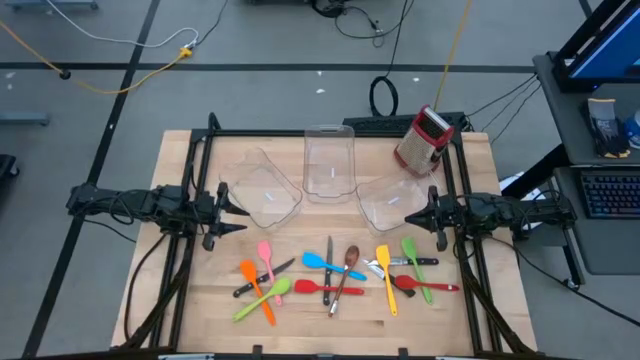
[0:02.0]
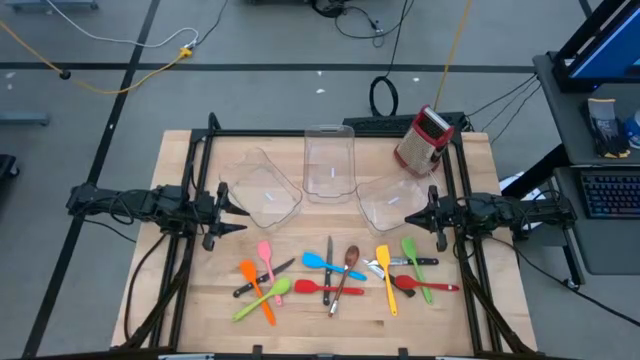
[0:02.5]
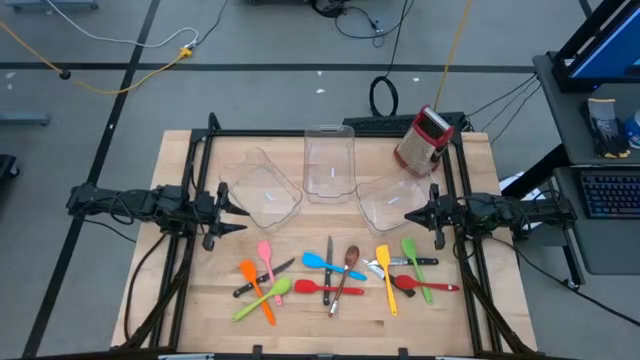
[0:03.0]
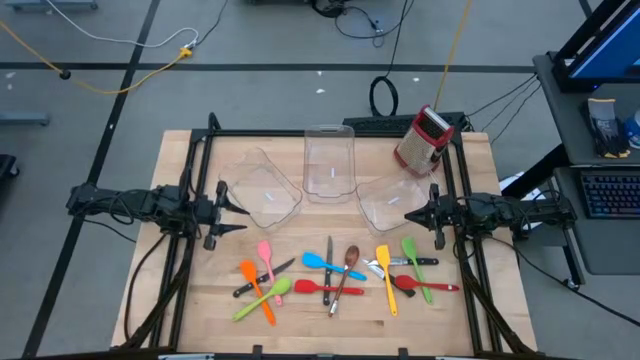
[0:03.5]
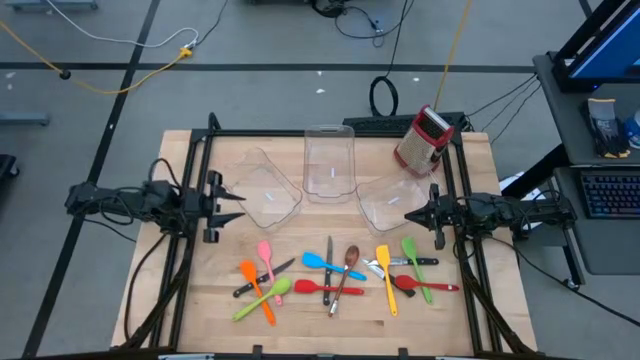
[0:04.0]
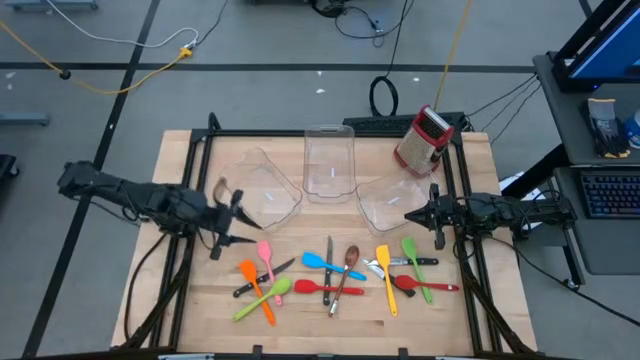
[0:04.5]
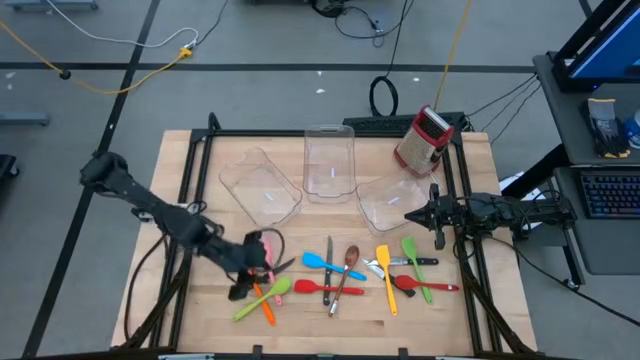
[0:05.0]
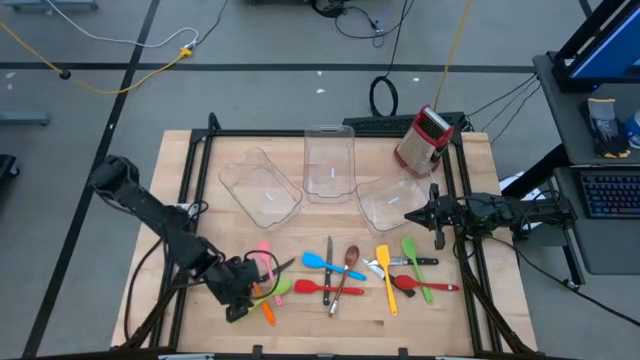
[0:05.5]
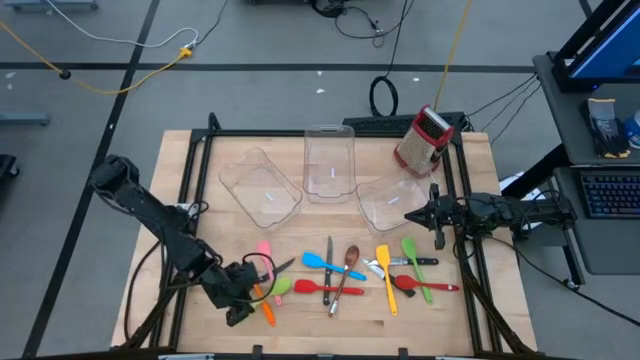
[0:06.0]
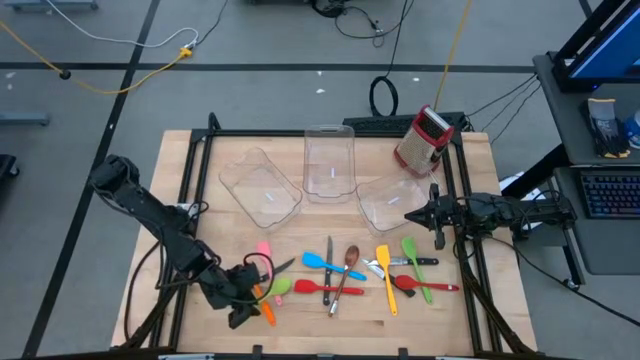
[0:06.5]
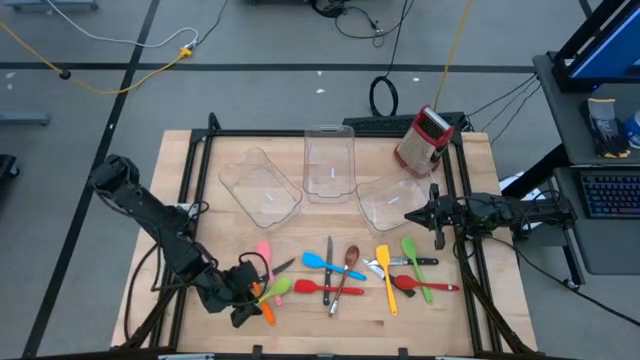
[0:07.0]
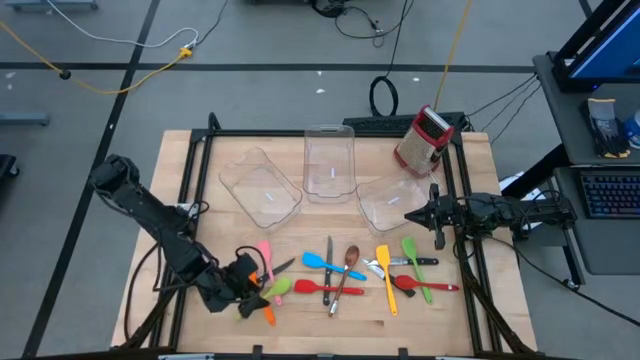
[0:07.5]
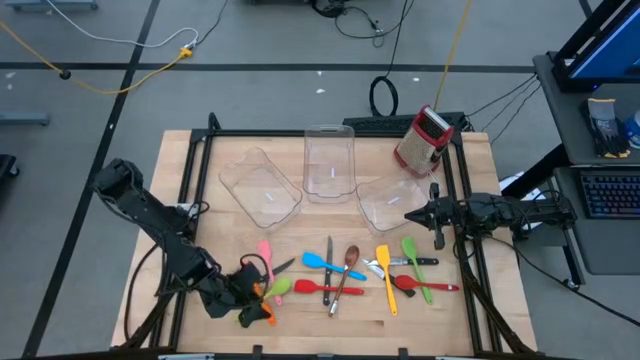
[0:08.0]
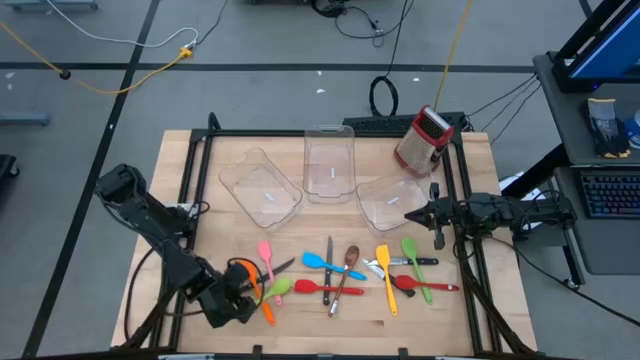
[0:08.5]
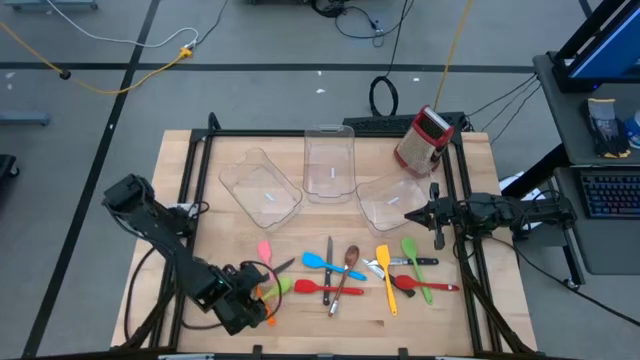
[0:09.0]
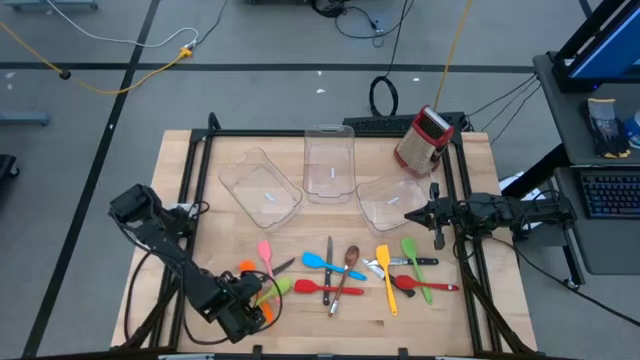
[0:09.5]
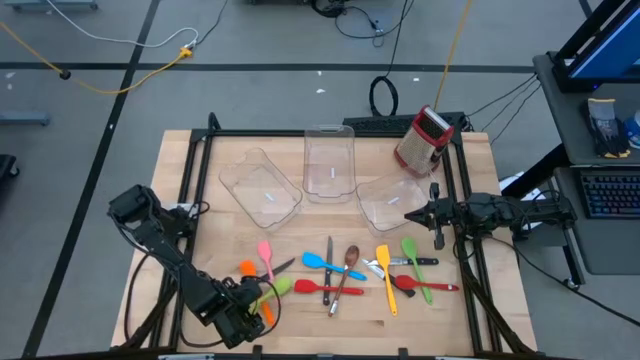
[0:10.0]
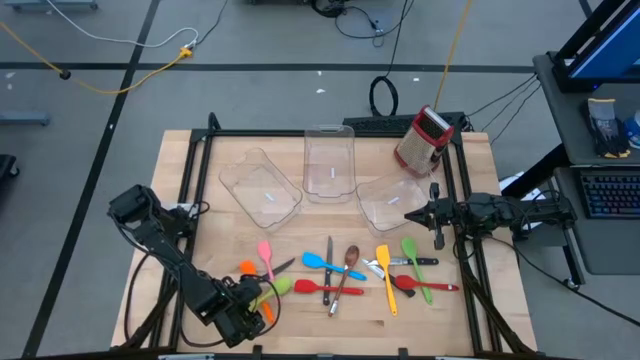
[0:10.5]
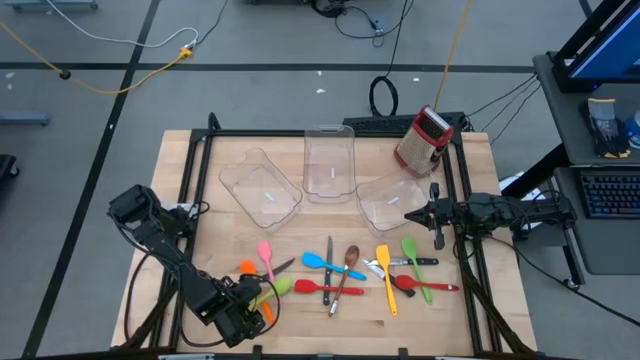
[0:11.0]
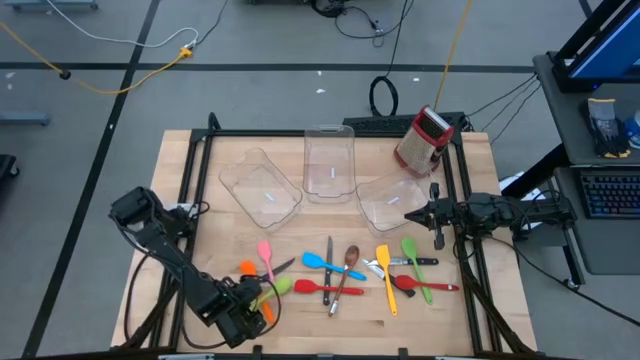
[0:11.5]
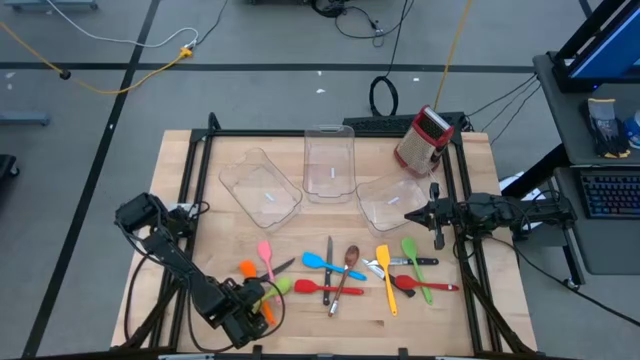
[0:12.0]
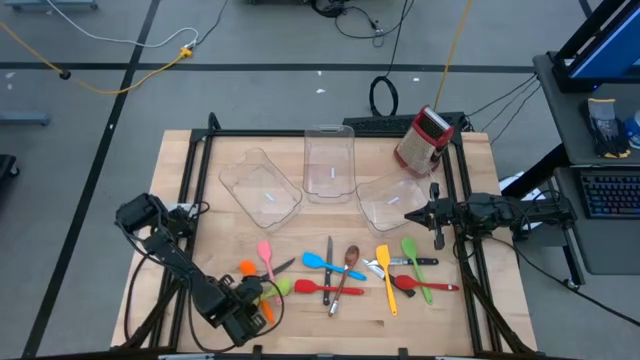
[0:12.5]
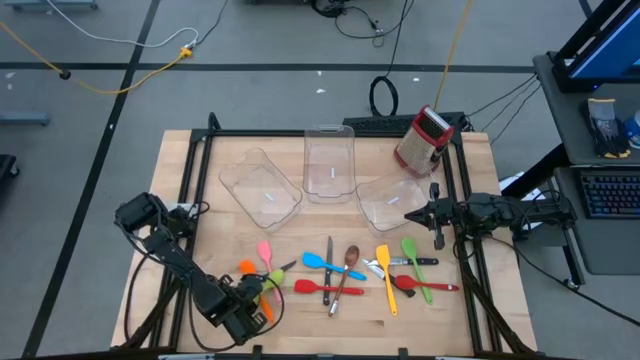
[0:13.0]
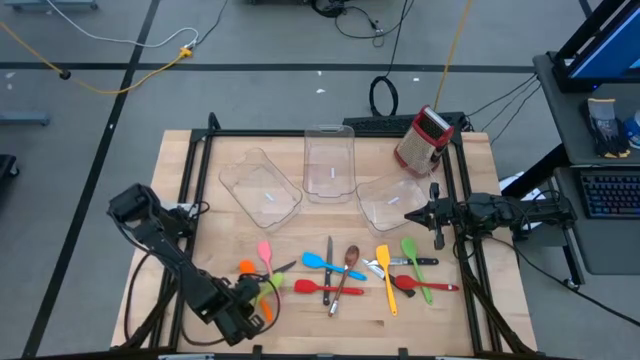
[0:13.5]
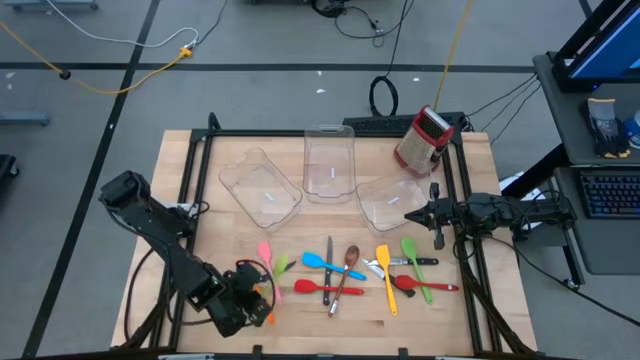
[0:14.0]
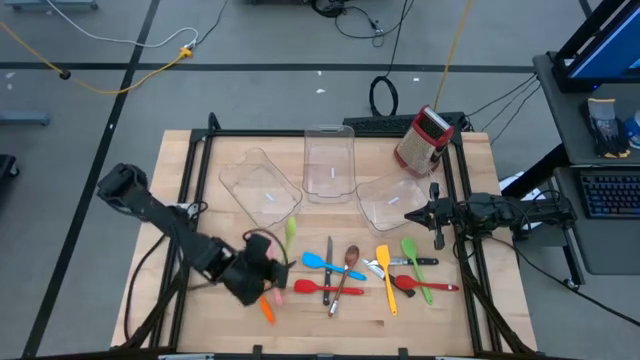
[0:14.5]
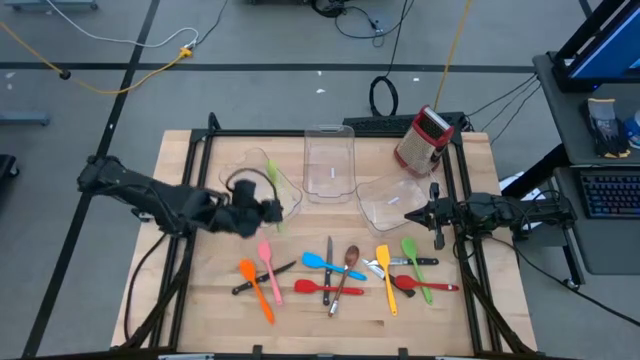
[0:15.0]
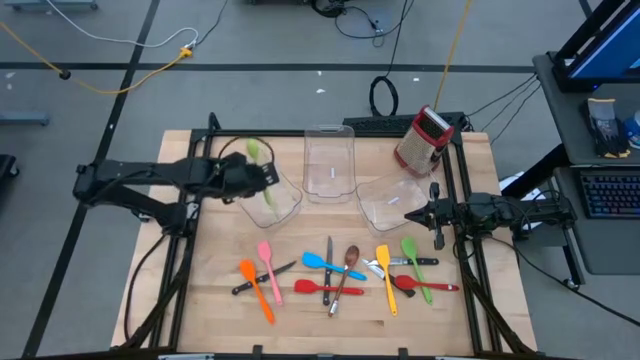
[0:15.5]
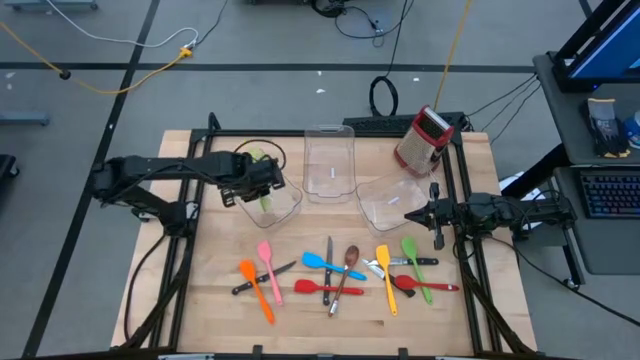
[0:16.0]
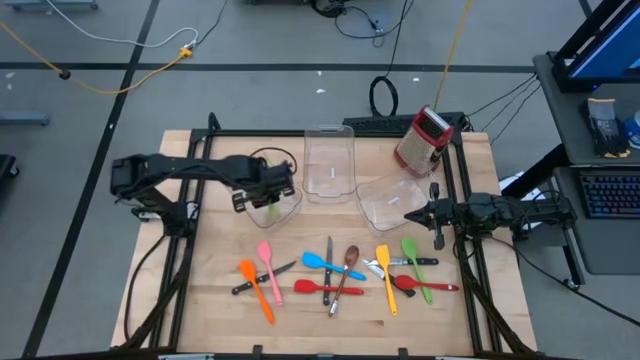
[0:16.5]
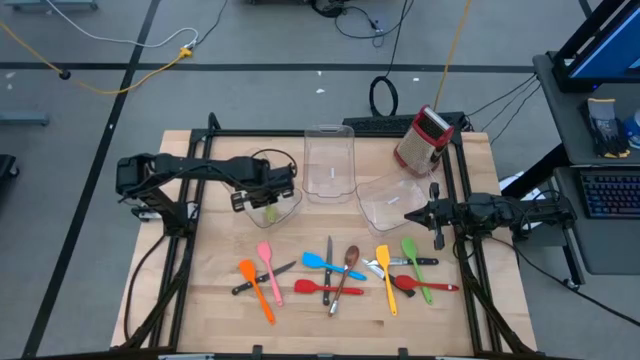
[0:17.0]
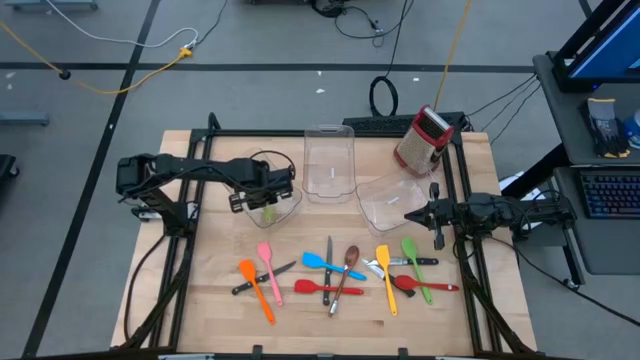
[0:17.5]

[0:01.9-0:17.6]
Task: Pick & Place Kitchen Items
Put the green serving spoon into the left bin

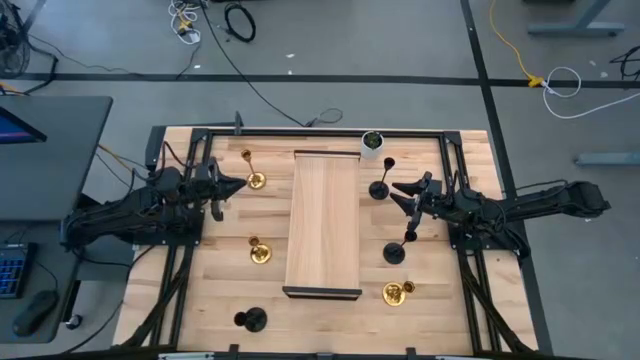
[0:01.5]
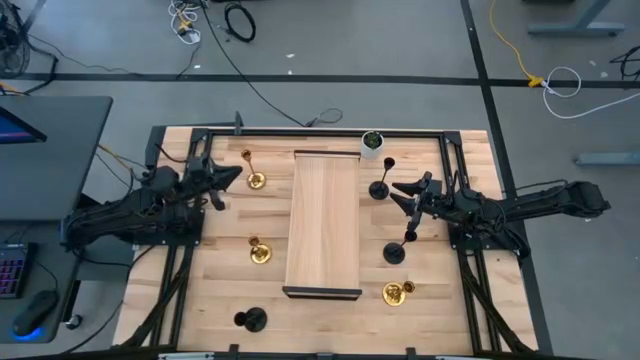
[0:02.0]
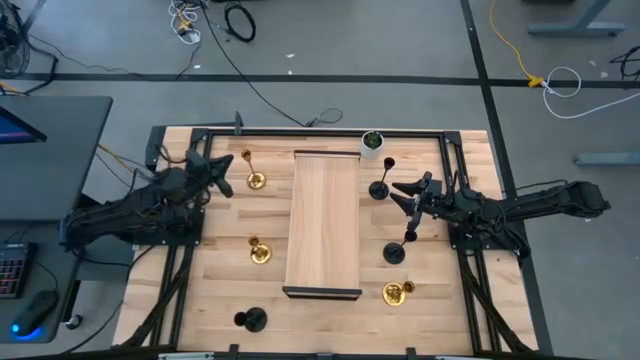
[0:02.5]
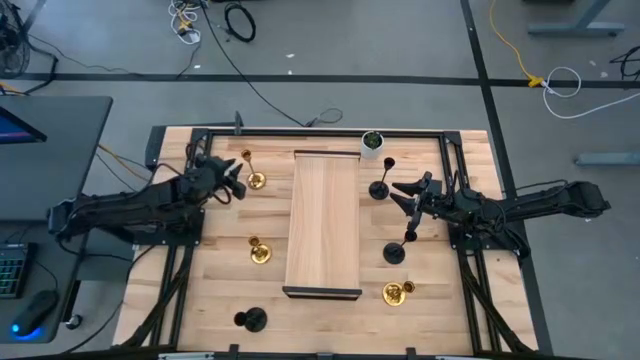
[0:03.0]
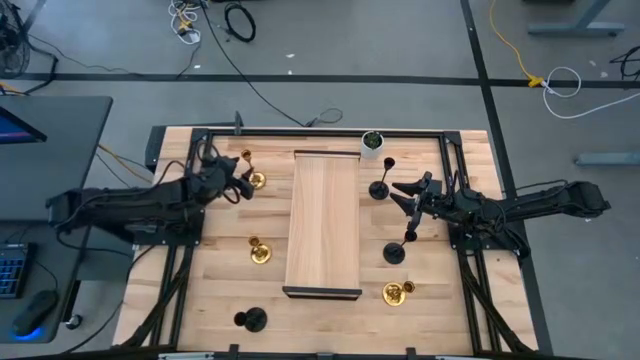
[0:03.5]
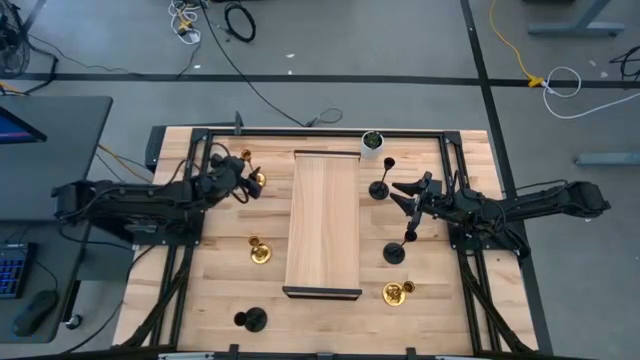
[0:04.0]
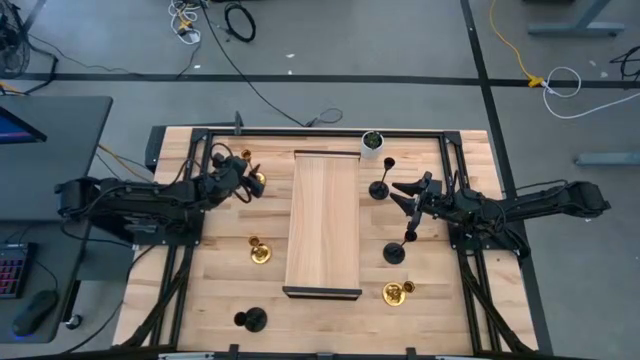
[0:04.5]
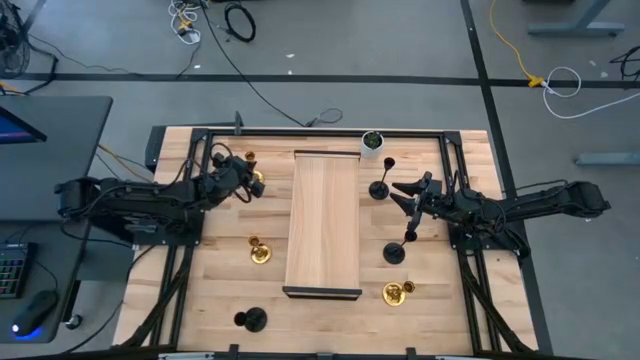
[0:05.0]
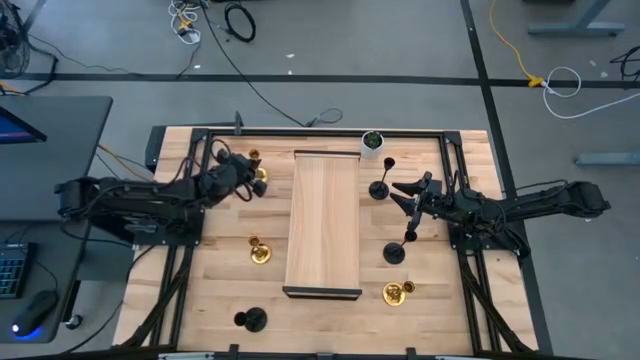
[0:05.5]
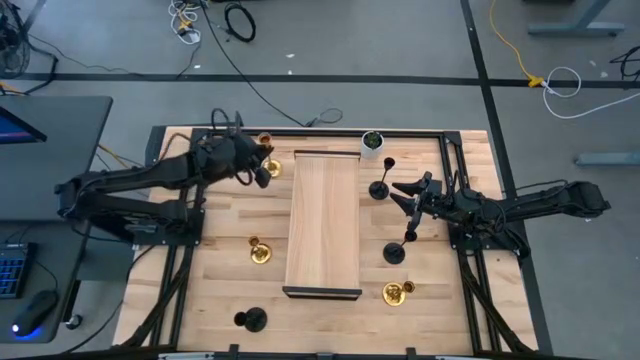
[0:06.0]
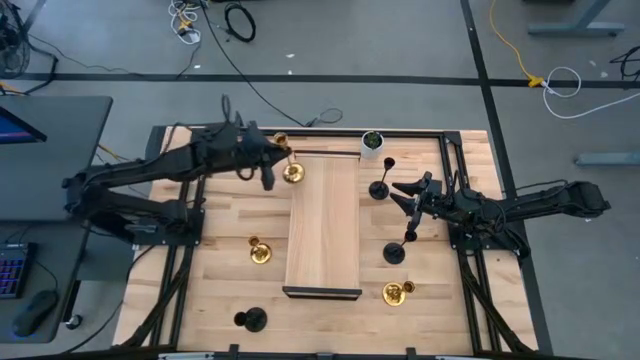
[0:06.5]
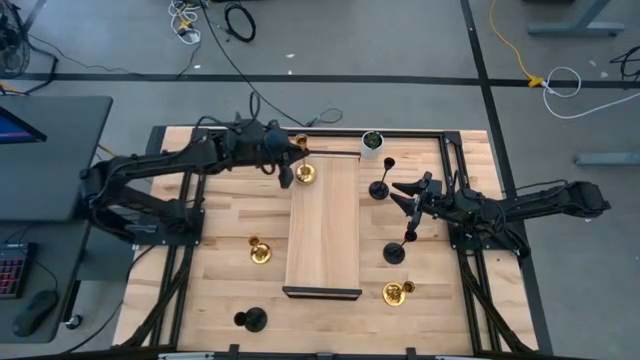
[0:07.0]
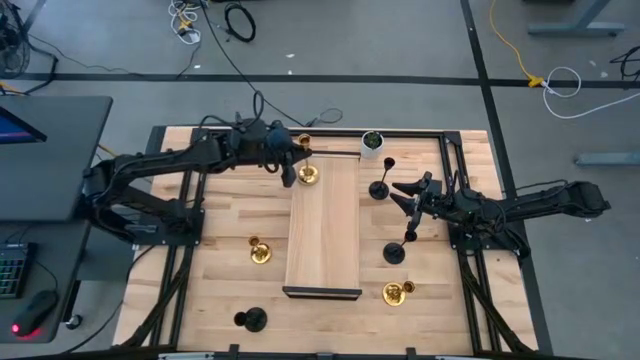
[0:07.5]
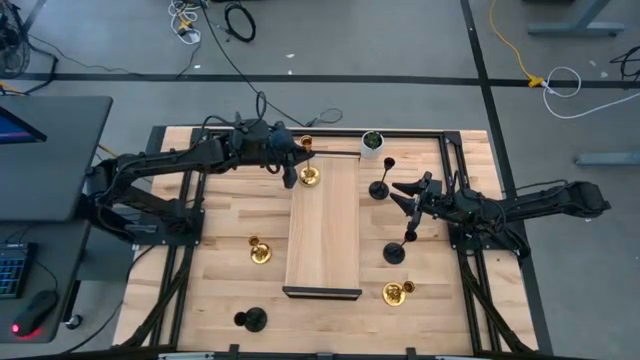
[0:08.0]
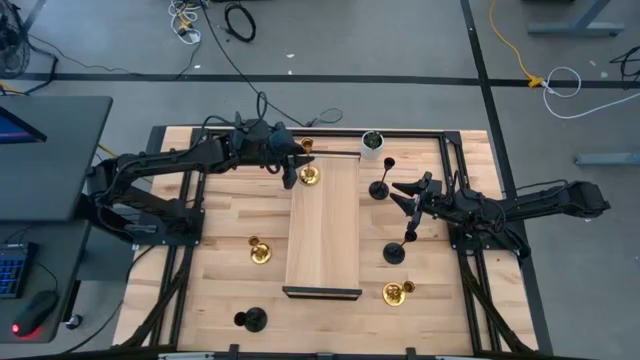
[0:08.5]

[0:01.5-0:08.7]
Task: Pick & Place candle stick holders
Put the top gold candle holder on the shelf
